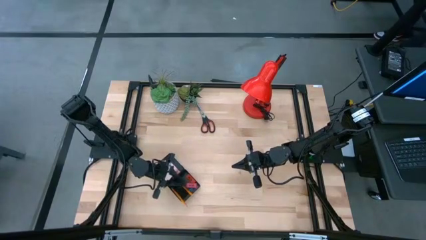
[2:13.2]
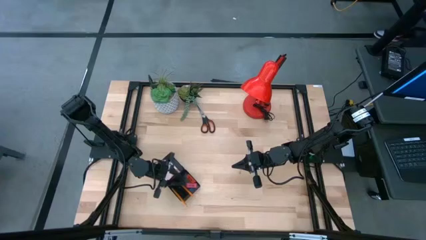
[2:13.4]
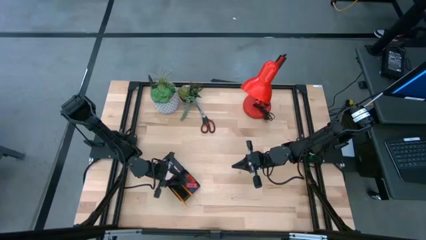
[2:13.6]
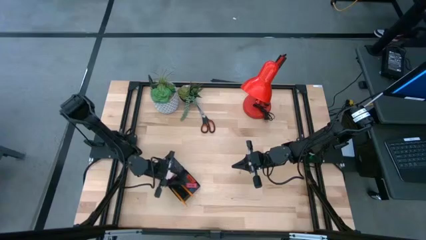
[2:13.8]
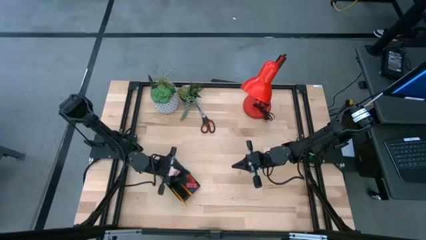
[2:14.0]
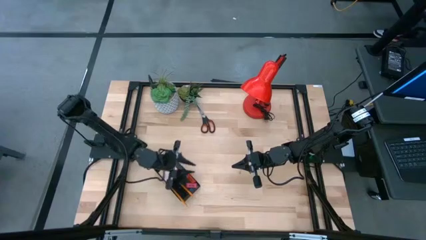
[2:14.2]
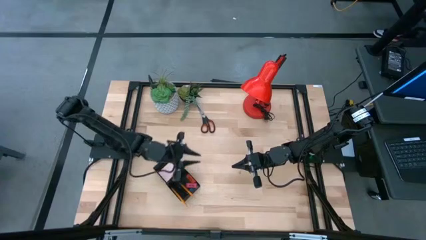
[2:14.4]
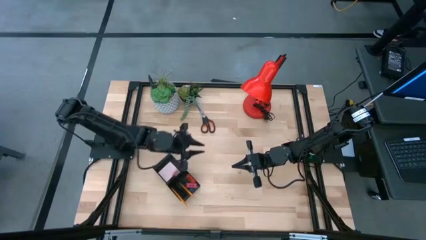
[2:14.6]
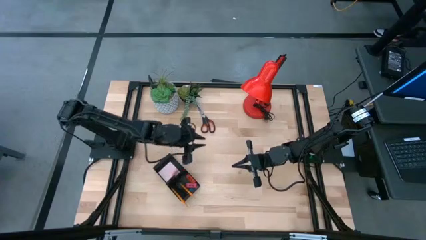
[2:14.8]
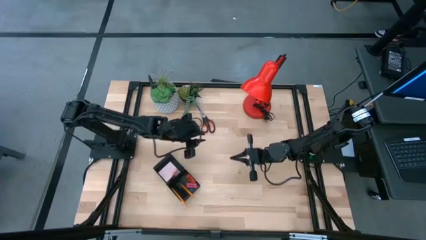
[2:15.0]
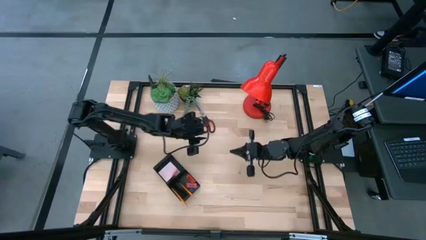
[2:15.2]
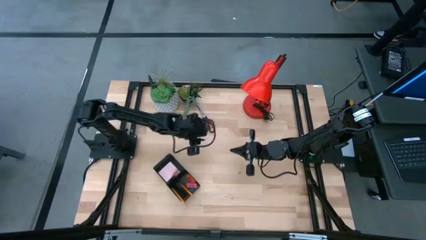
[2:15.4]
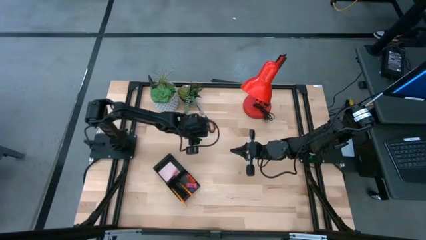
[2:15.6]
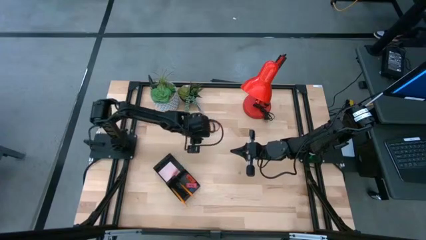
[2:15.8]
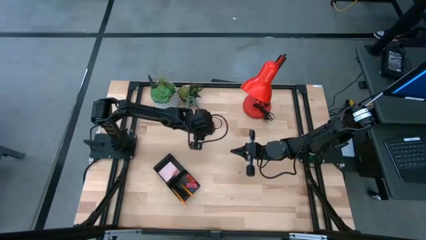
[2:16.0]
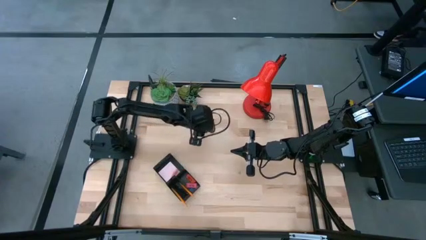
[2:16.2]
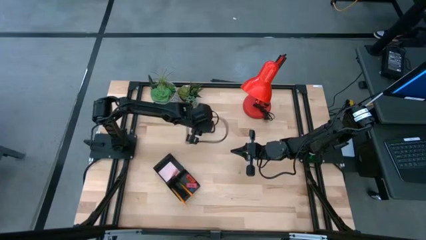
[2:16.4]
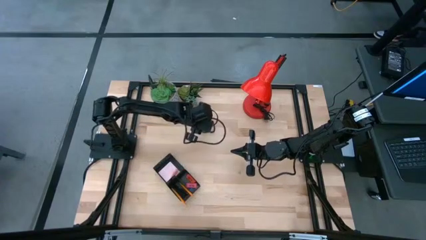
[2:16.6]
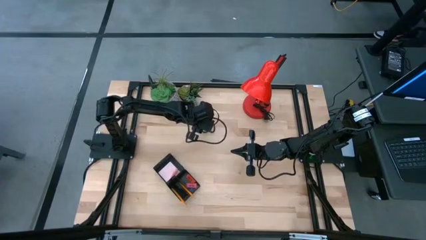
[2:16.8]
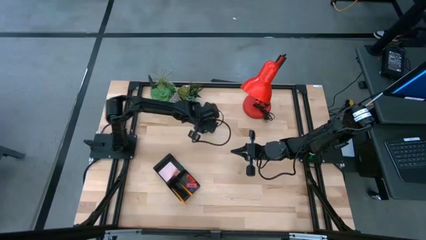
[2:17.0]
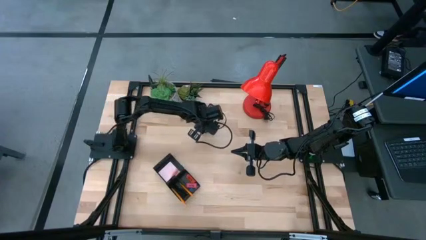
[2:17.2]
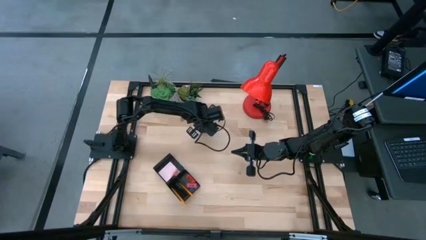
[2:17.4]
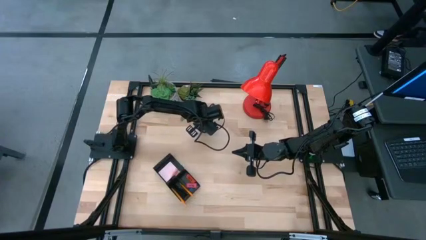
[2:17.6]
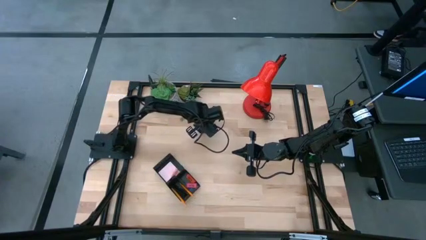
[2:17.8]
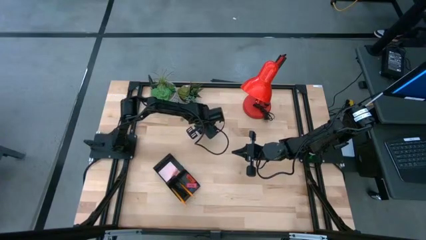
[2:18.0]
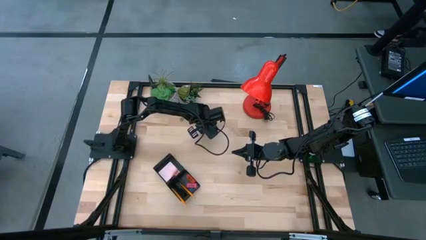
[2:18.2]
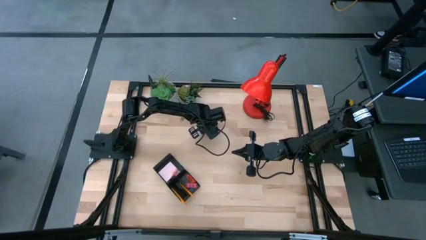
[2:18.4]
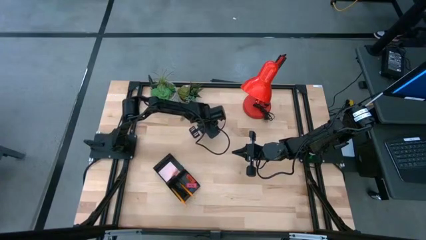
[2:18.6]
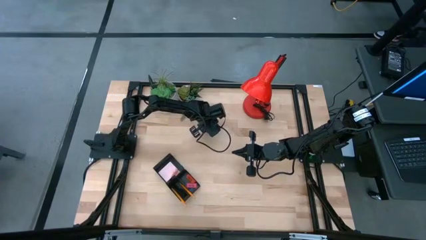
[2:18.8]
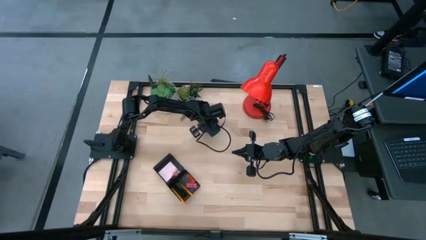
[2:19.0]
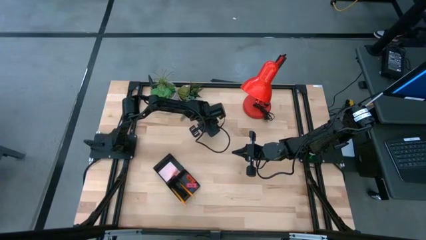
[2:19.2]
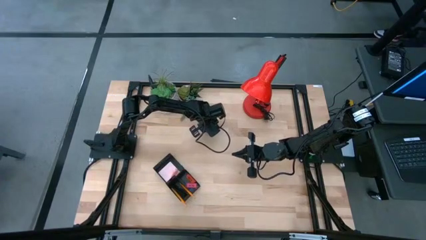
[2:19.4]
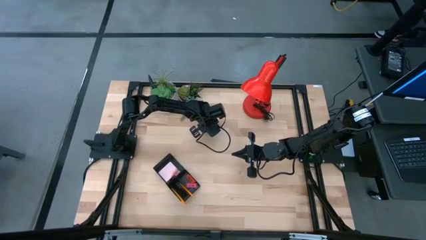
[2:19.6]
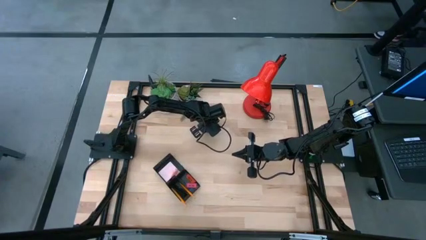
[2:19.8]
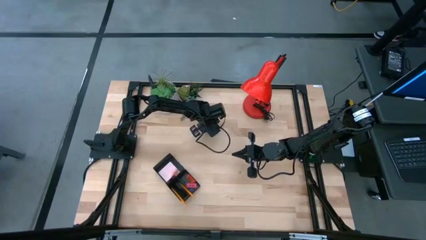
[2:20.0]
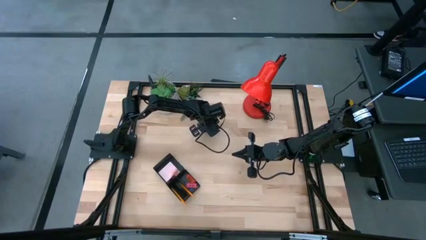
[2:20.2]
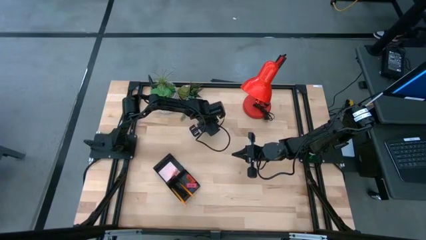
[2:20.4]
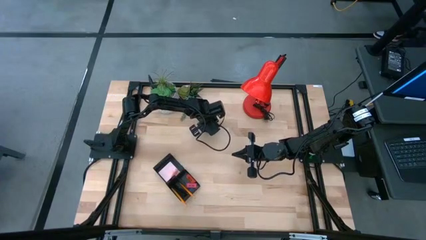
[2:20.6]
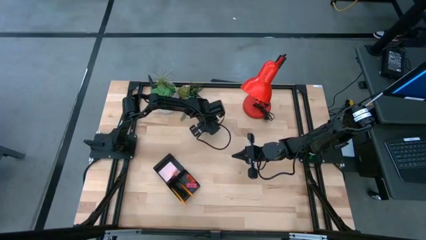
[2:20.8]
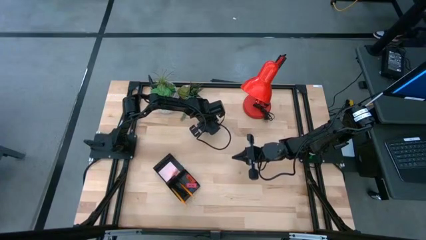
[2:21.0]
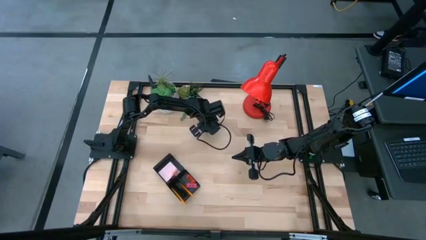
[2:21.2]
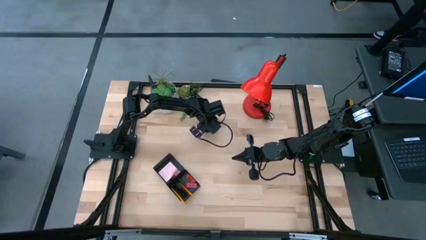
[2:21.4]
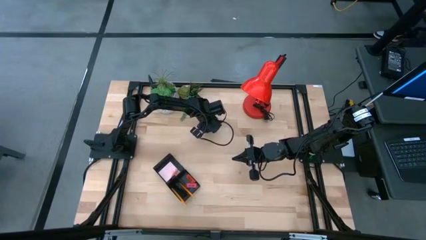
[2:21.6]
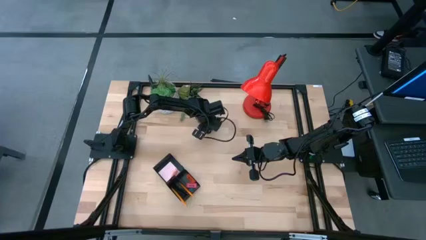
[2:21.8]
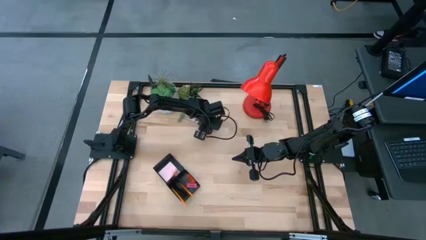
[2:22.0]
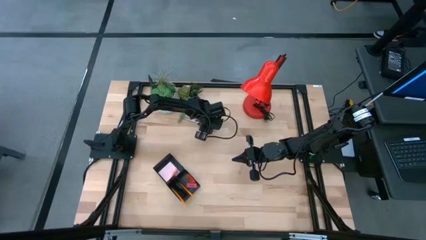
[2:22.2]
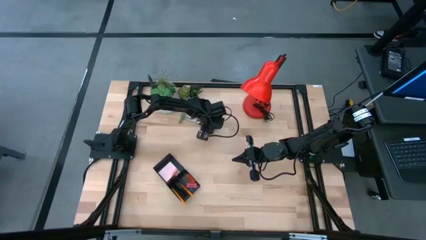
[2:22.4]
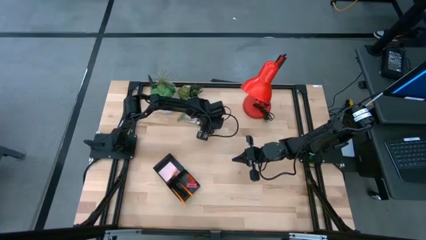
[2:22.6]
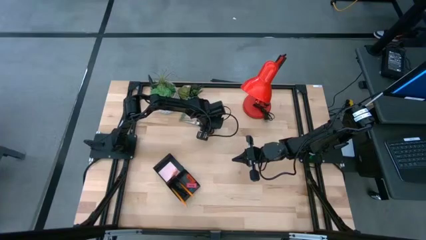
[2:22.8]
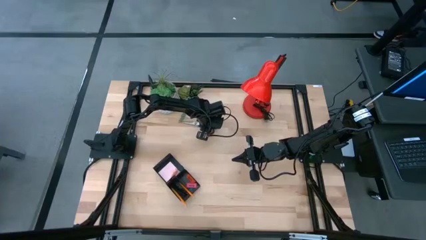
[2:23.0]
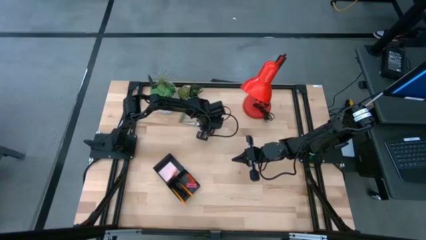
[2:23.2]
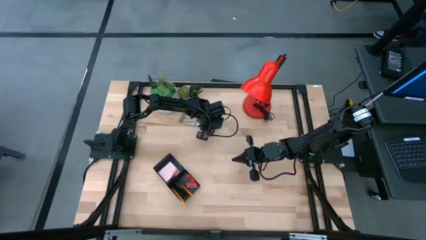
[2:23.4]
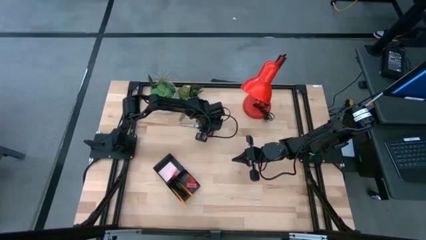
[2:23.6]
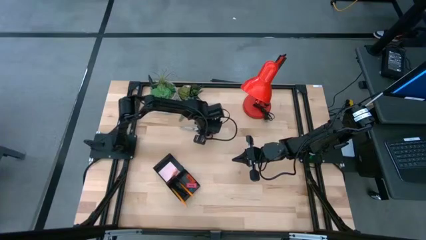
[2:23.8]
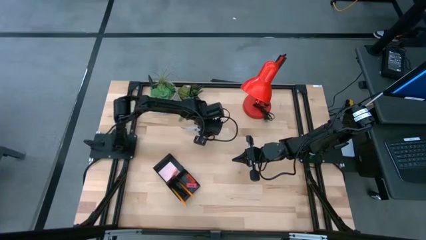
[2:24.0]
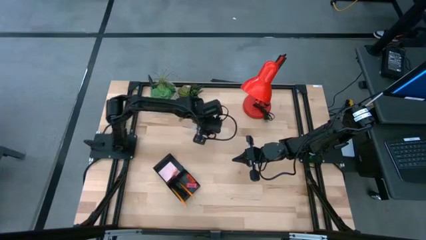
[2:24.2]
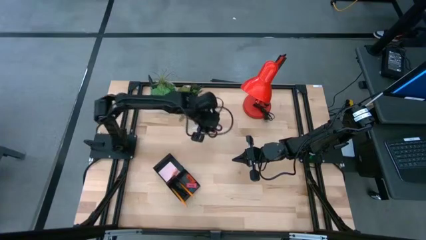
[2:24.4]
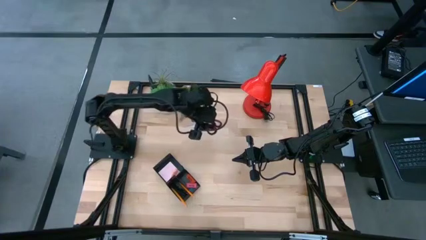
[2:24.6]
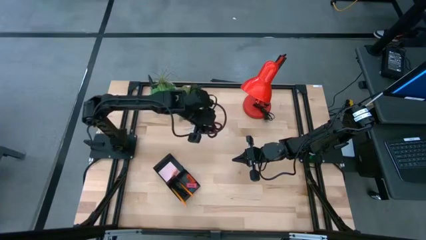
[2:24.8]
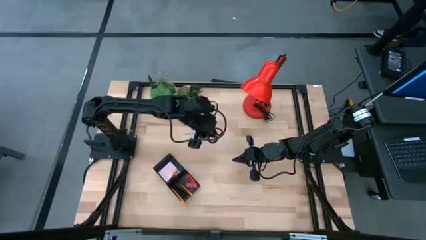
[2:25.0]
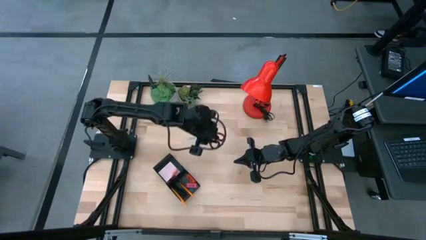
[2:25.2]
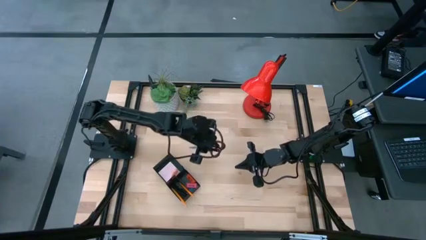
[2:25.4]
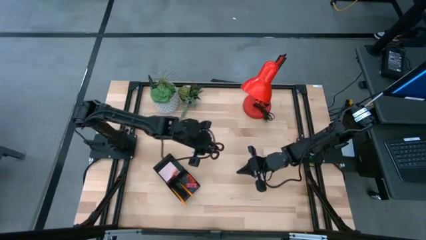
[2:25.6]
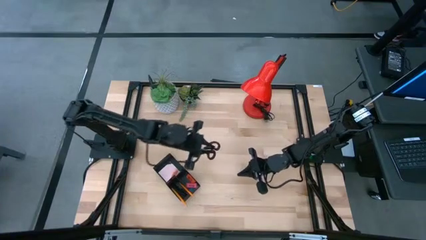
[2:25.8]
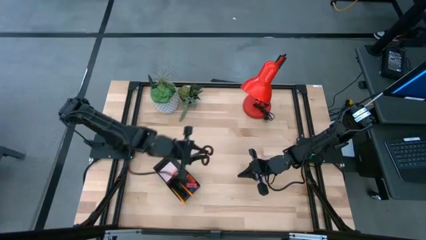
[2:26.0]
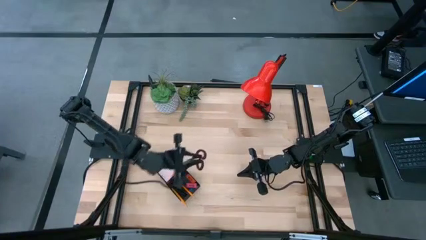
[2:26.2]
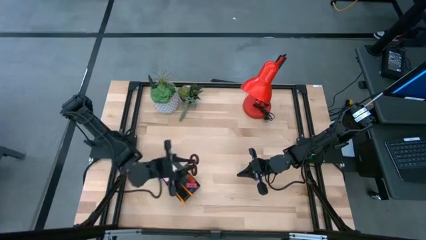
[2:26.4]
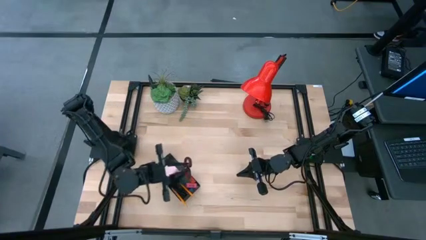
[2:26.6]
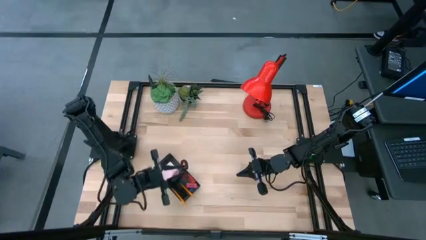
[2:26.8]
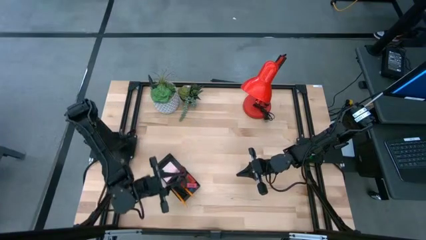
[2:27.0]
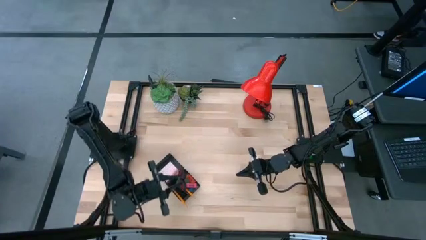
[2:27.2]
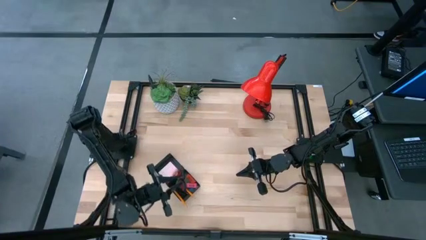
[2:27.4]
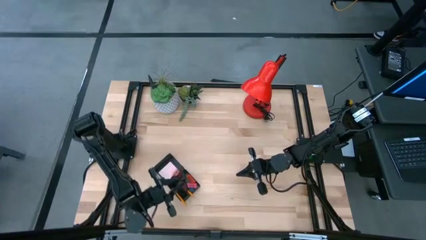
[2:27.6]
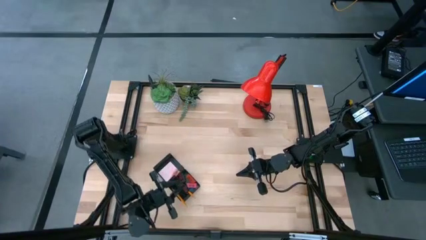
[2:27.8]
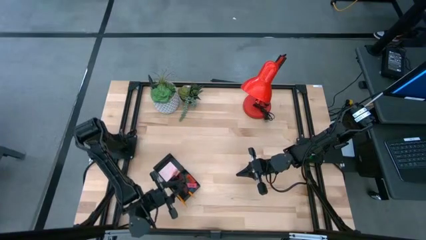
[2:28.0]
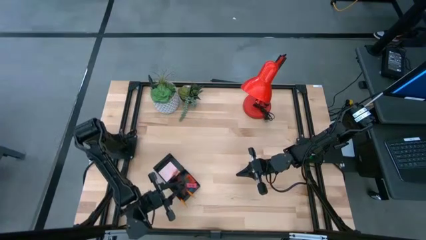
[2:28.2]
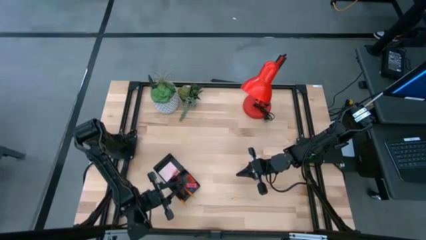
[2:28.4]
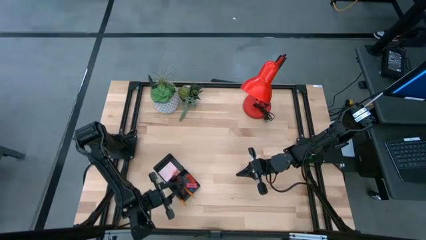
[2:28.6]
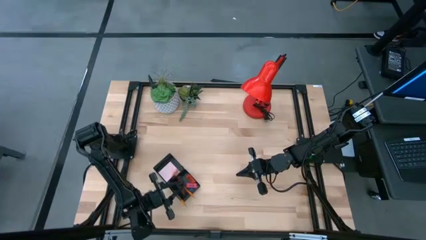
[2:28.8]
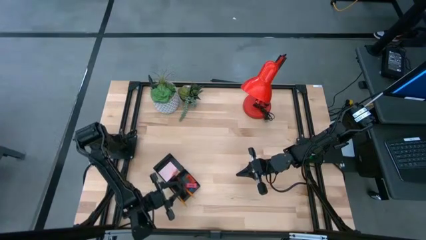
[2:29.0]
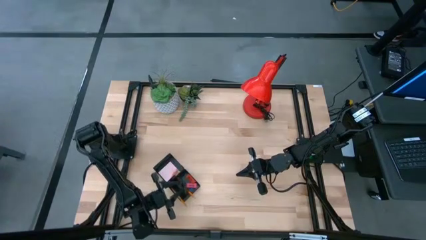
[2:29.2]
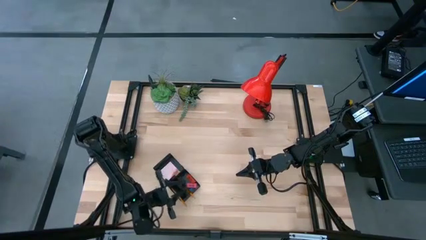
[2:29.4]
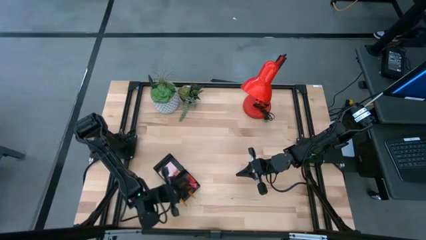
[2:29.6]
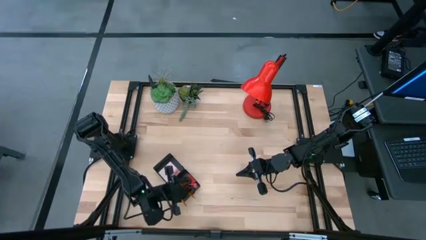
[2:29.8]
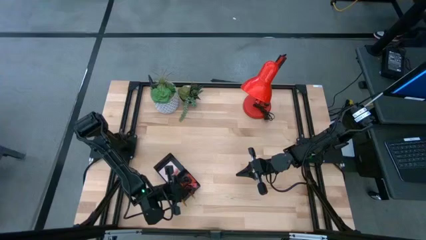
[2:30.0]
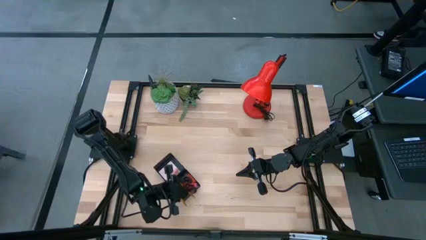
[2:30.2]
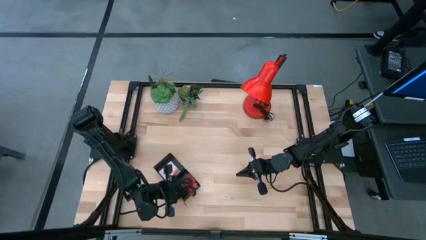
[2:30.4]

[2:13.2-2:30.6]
Task: Pick and place office supplies into organizer
Put the black scissors into the black desk organizer
